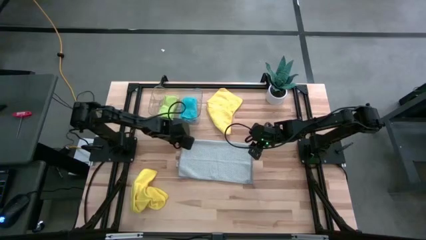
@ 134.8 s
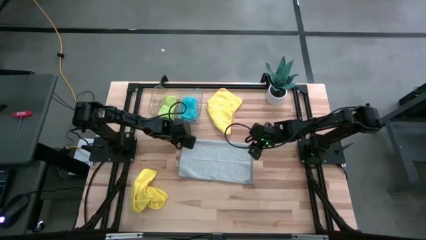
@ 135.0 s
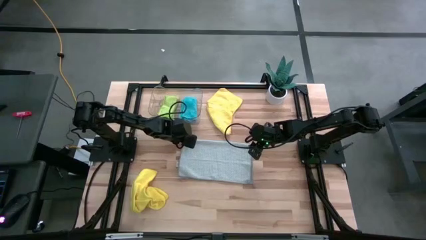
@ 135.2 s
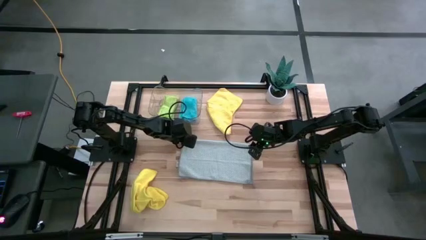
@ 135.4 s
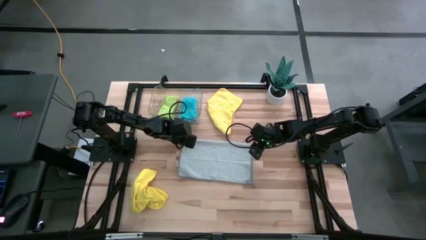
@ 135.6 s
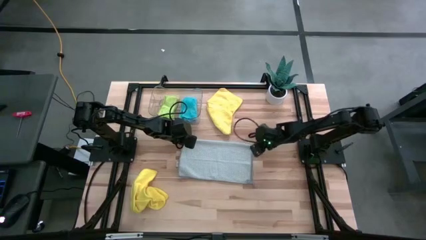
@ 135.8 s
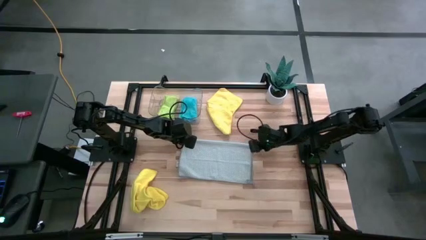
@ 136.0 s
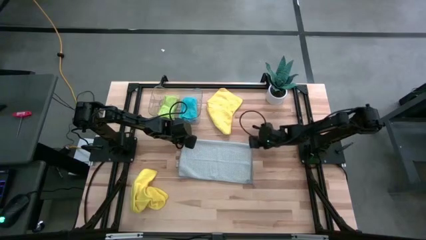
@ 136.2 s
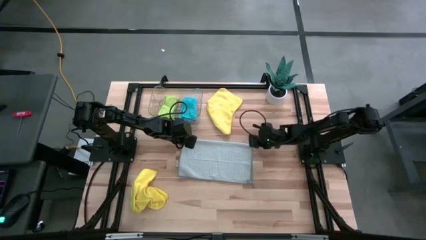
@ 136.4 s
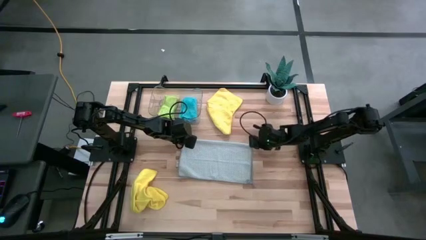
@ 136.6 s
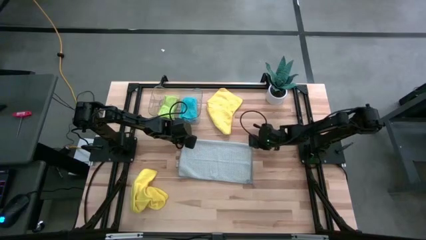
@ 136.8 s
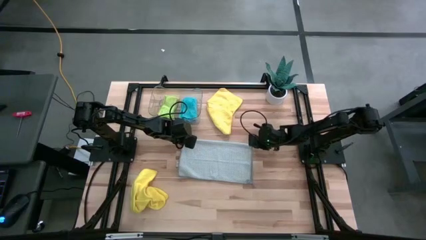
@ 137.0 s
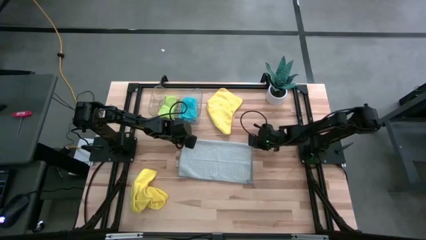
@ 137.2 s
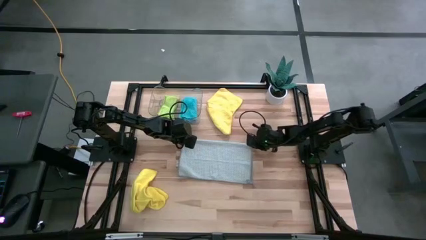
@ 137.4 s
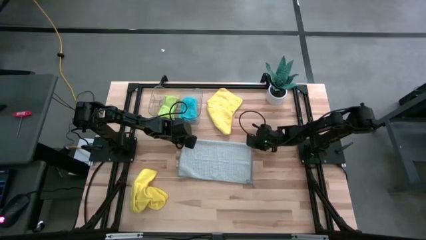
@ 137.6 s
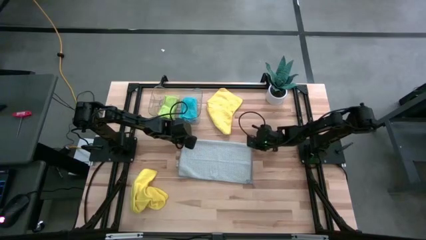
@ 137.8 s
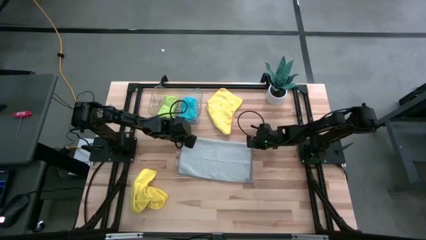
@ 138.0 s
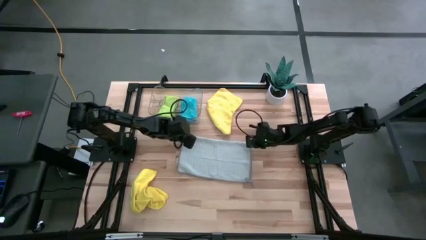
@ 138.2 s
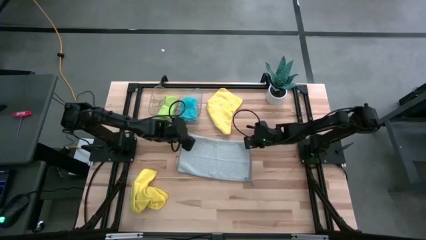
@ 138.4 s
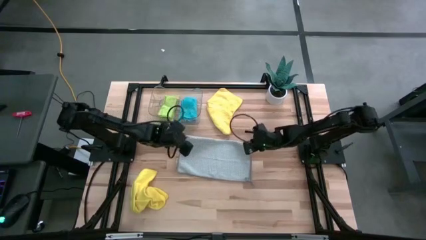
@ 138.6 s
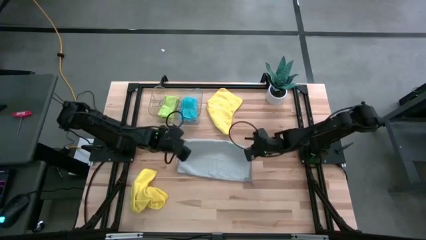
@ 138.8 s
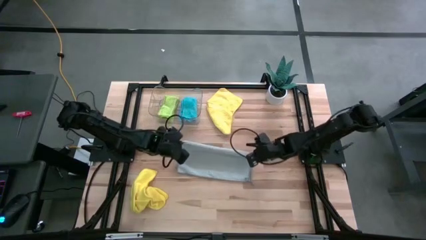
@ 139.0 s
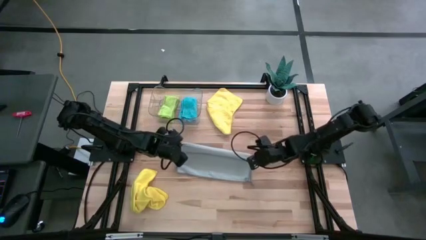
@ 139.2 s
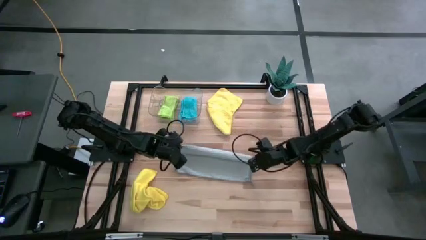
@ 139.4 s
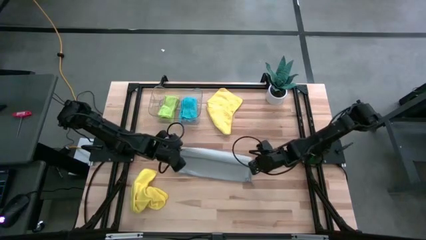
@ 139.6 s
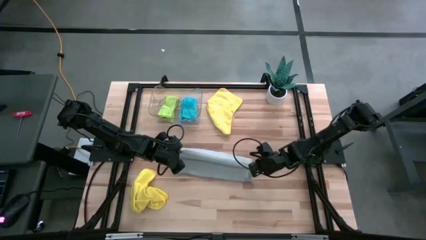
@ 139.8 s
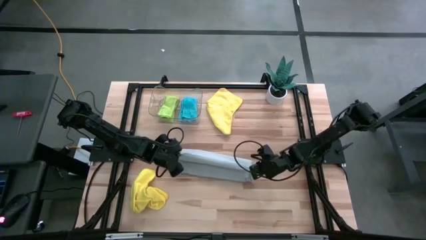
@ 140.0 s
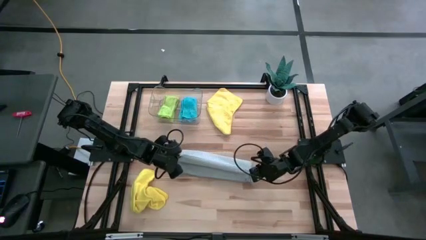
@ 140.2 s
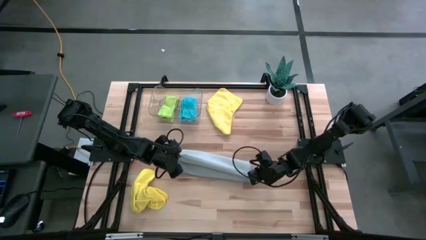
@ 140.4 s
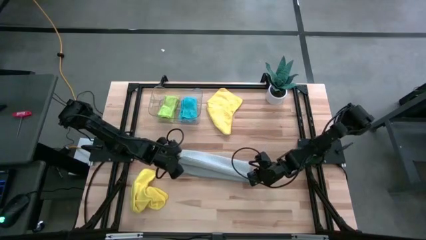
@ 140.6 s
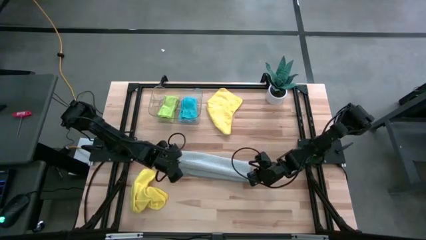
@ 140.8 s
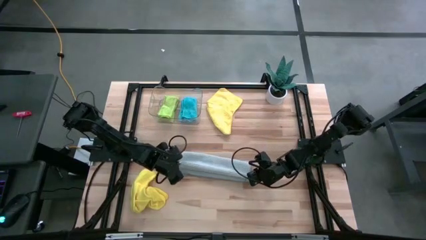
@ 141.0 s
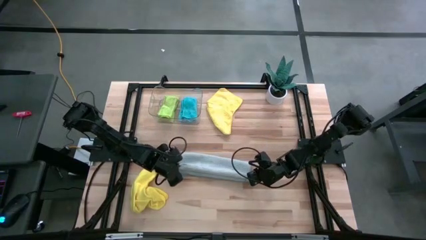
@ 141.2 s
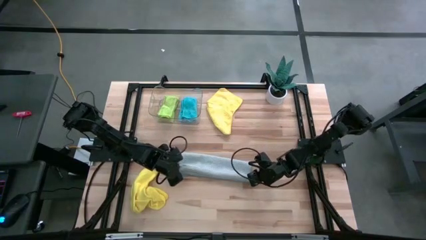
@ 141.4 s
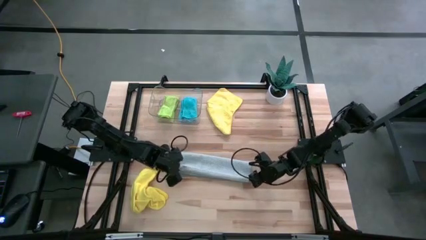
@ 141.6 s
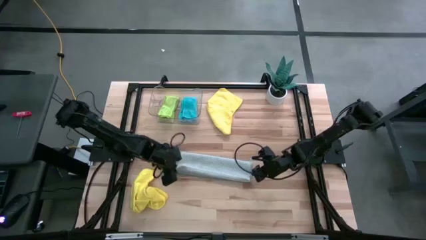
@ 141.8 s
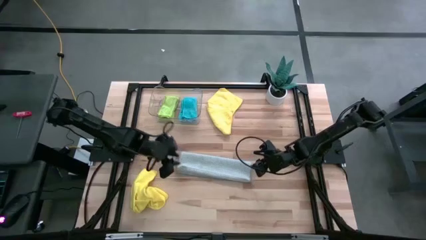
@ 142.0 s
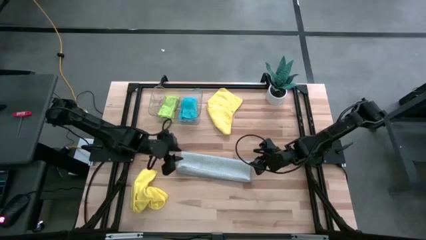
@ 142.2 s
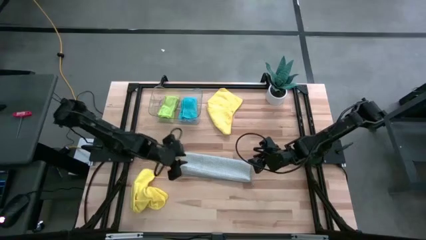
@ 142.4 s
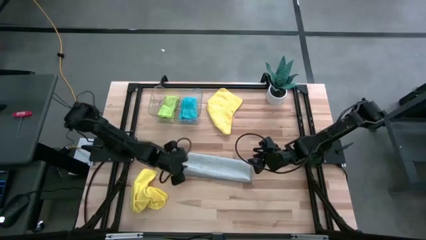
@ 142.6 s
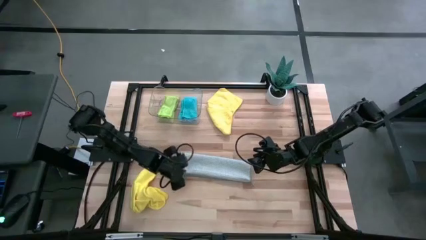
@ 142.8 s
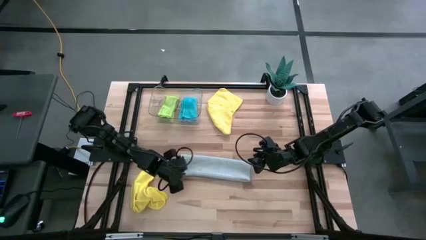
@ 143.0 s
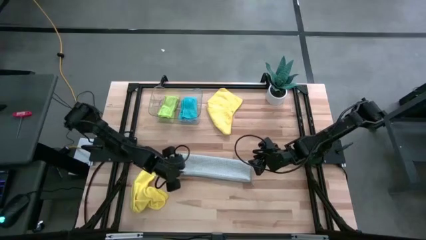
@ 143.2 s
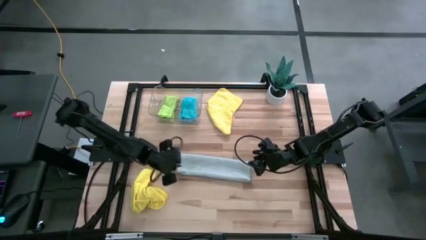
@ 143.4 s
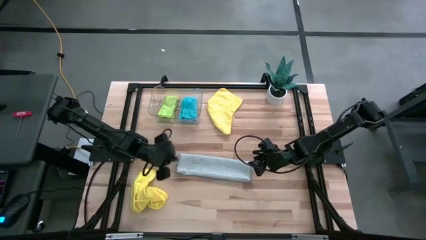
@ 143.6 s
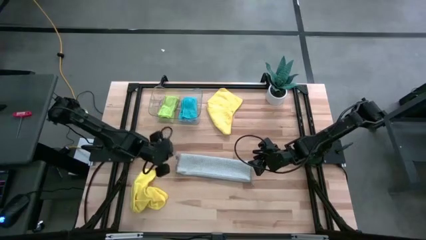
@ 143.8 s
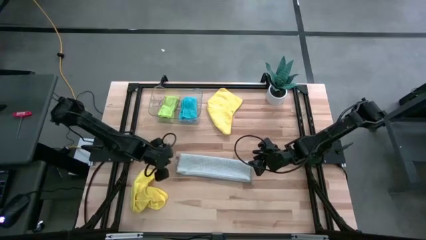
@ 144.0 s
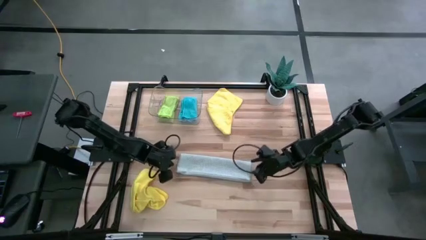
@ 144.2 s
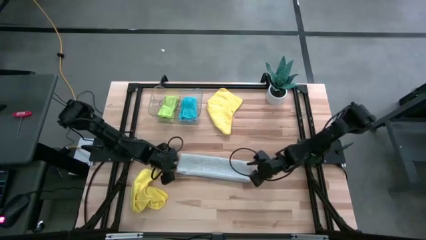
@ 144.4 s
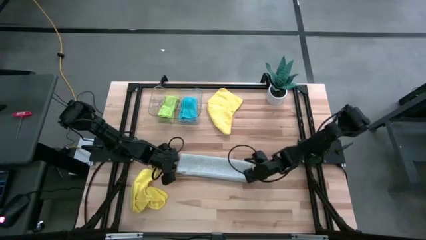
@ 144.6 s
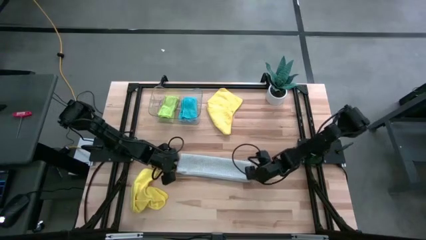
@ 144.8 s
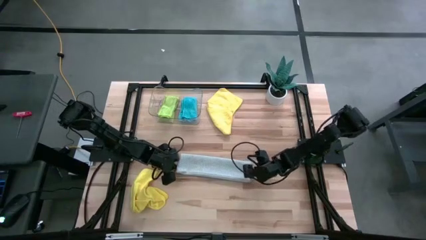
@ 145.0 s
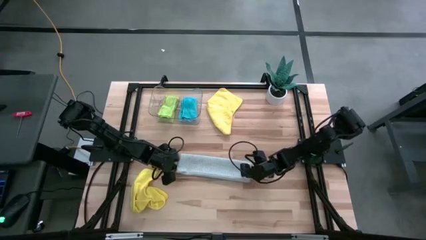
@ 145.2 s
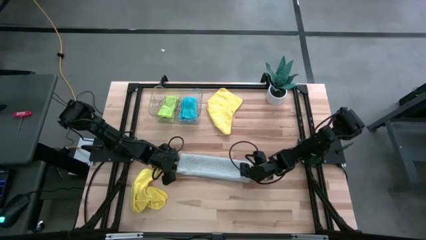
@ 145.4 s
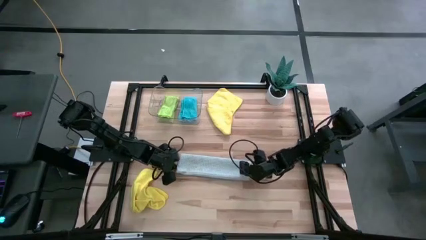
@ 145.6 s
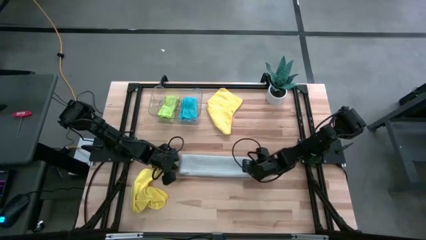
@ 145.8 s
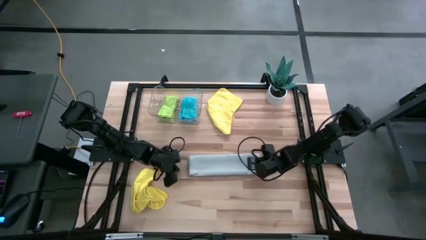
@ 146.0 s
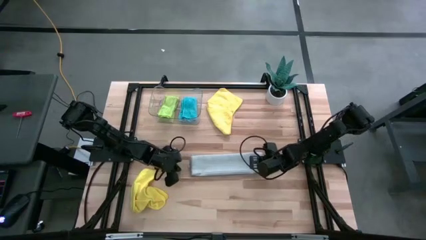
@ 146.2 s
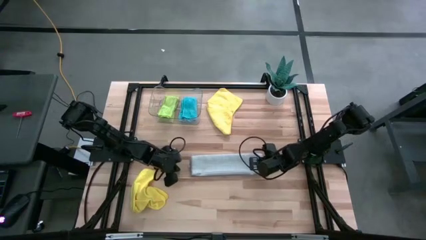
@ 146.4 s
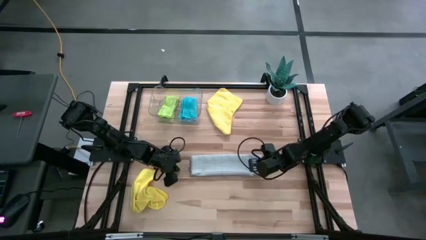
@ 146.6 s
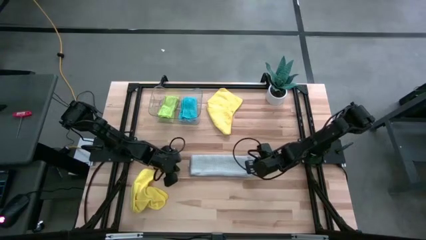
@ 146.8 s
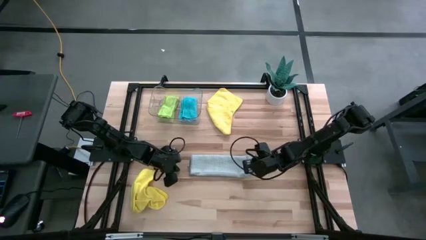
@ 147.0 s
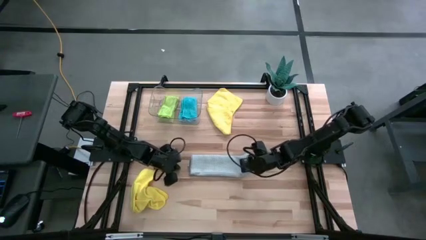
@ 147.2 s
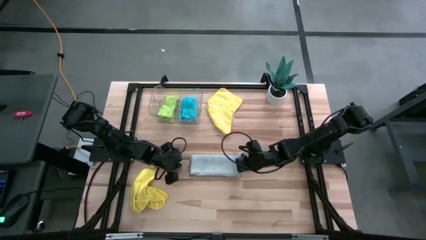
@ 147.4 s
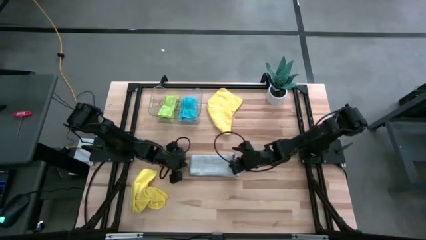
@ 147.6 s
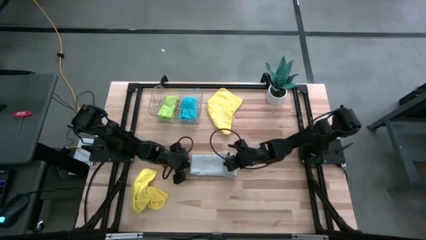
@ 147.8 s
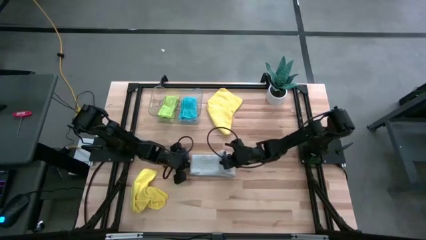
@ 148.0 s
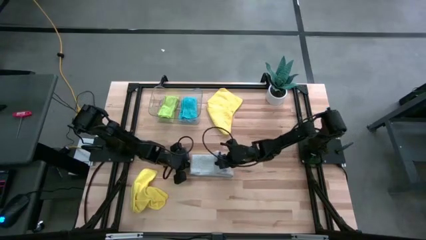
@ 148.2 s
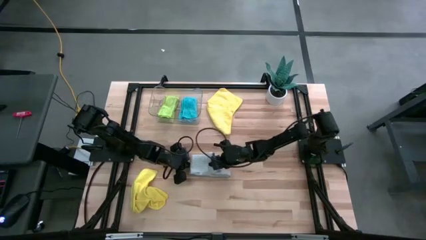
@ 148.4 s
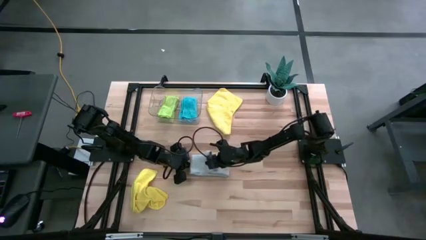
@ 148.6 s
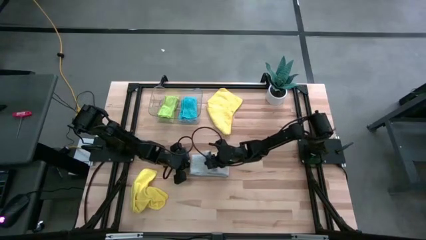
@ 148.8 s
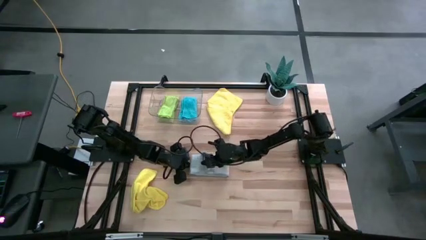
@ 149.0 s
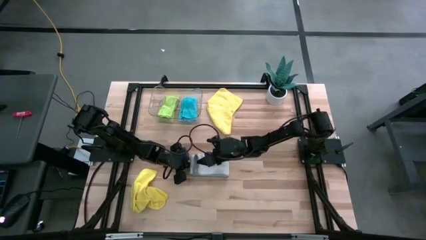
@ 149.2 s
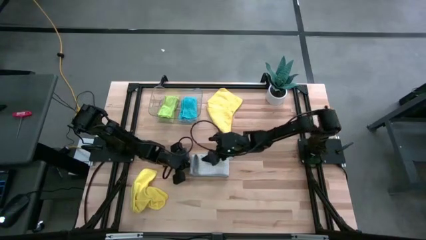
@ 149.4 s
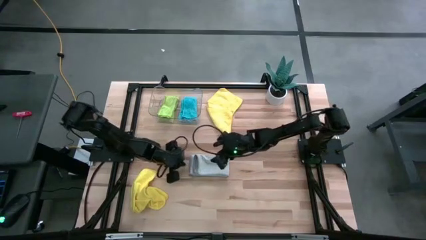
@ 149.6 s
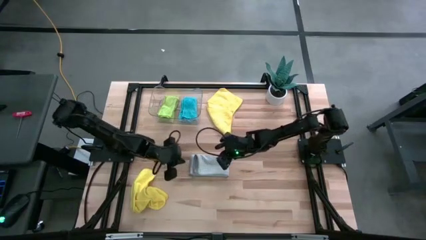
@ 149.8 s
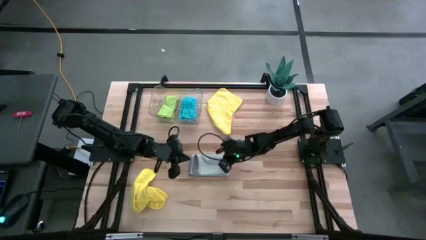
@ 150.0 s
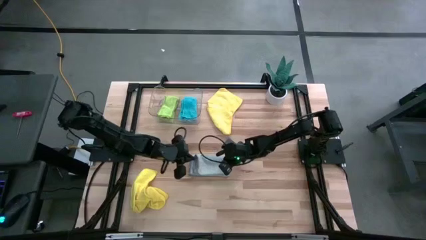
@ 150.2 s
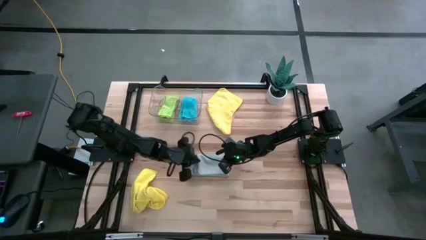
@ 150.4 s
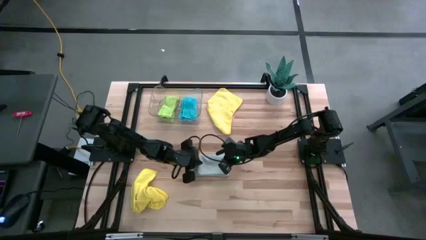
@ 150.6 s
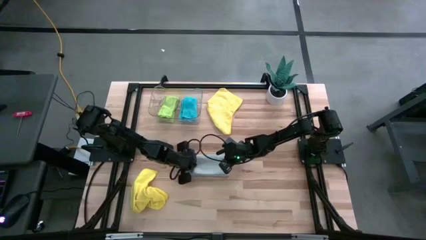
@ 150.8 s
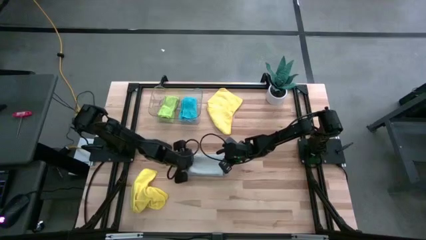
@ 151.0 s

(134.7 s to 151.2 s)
Task: Fold microfiber towels
Fold the gray towel
